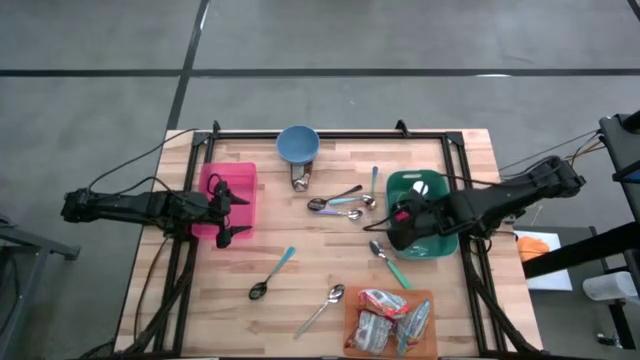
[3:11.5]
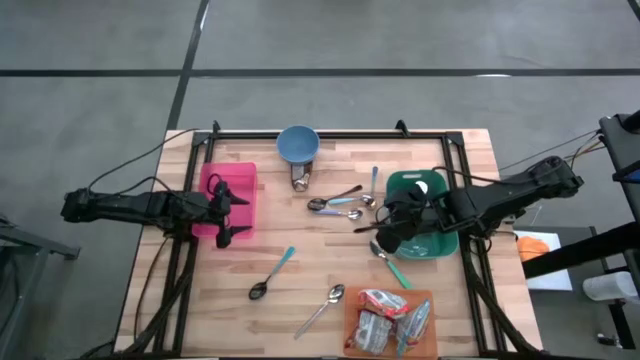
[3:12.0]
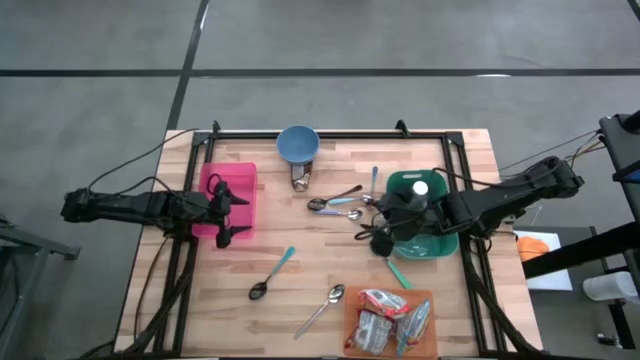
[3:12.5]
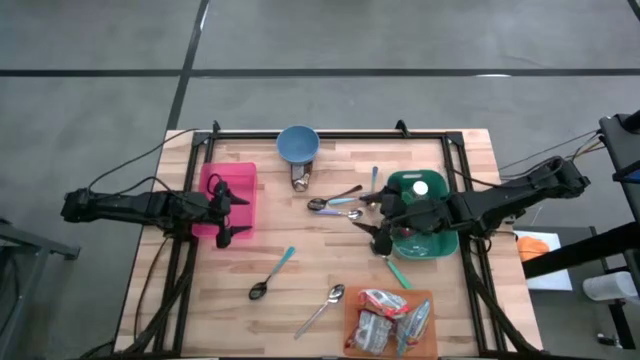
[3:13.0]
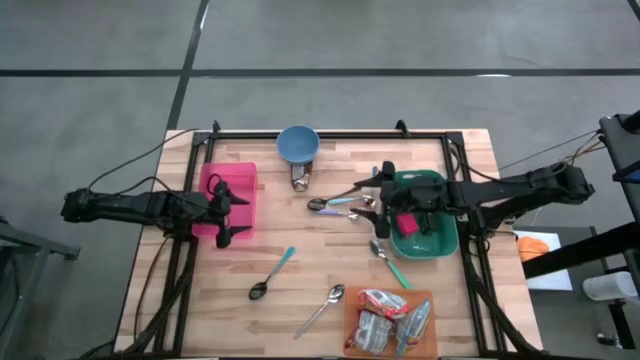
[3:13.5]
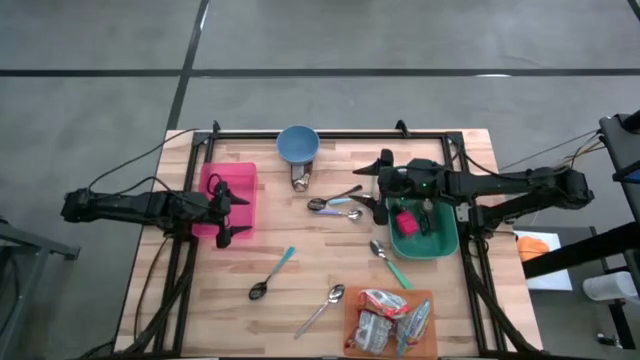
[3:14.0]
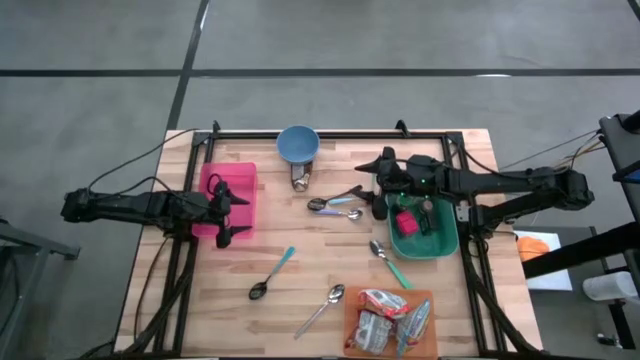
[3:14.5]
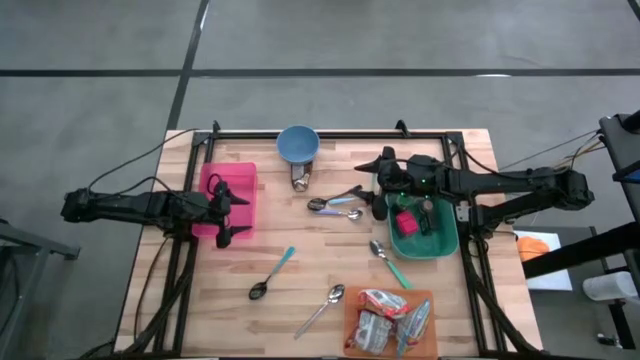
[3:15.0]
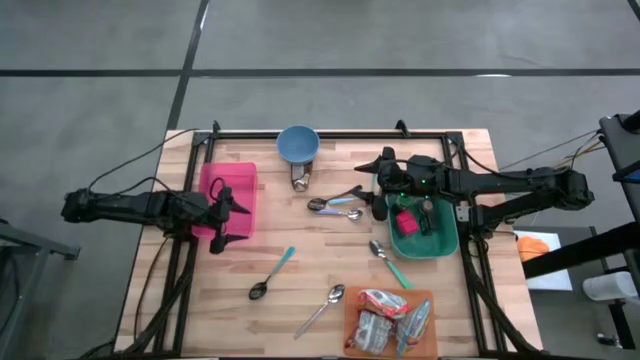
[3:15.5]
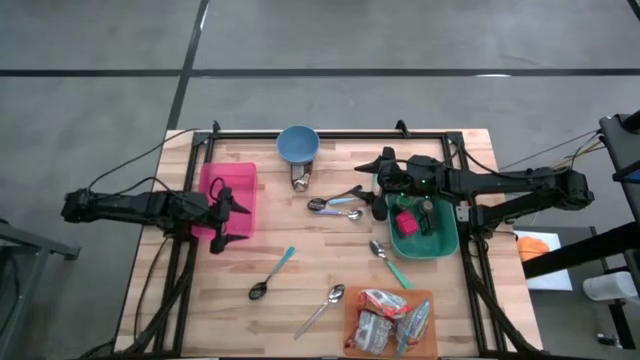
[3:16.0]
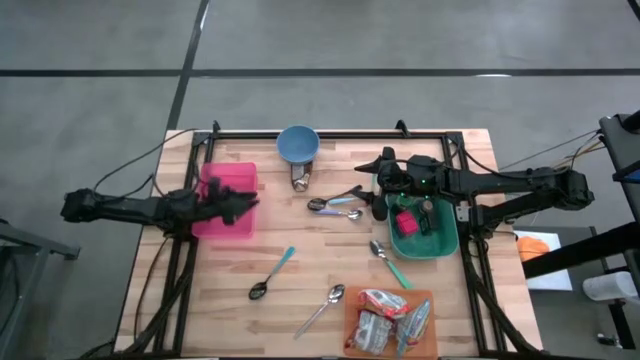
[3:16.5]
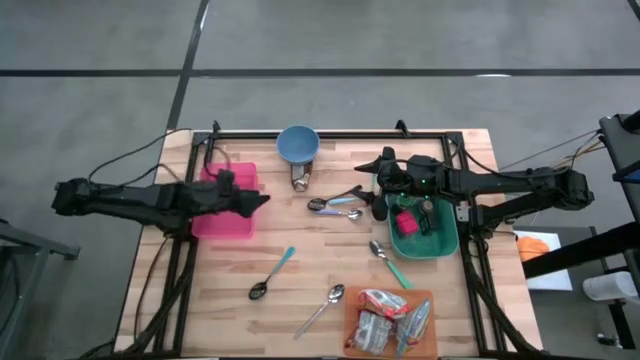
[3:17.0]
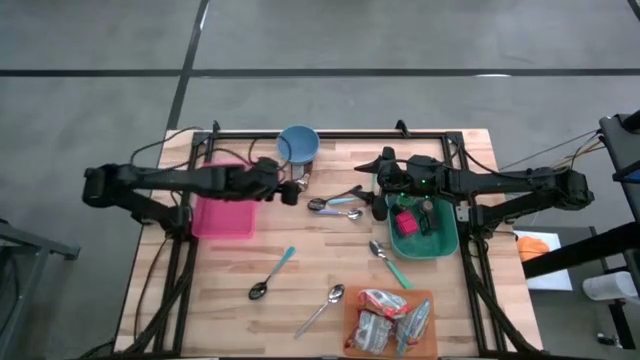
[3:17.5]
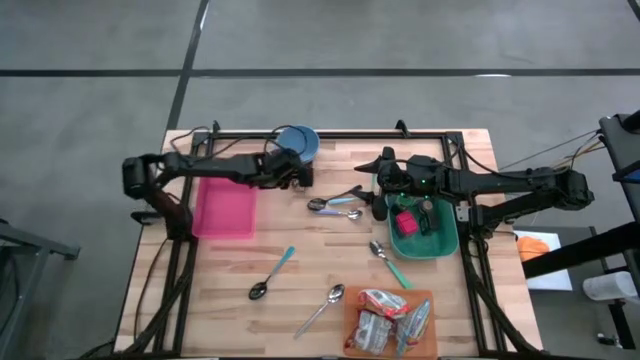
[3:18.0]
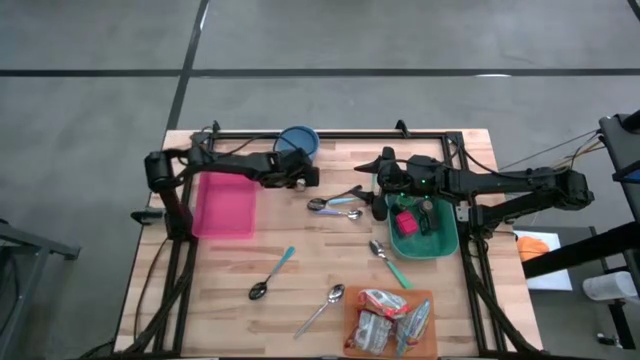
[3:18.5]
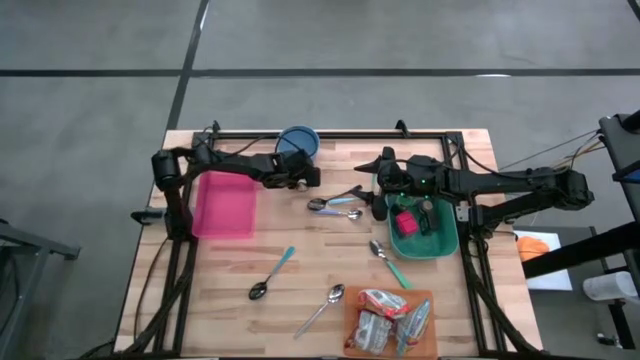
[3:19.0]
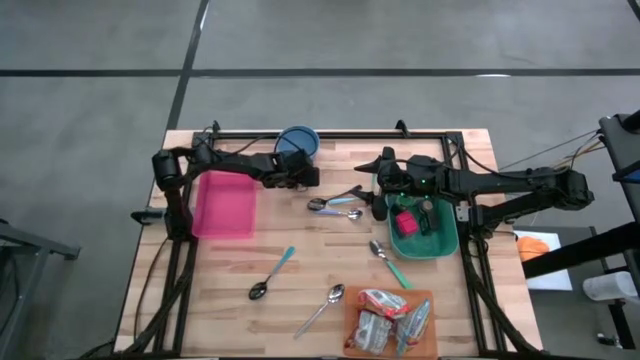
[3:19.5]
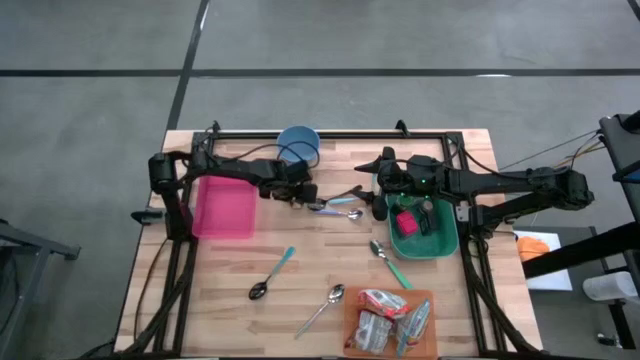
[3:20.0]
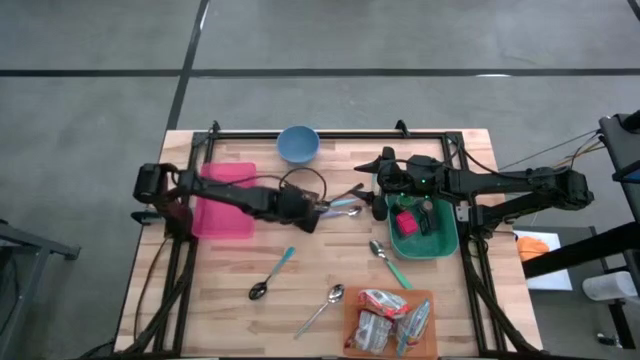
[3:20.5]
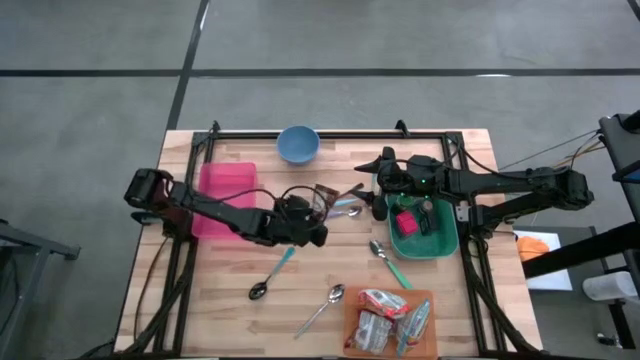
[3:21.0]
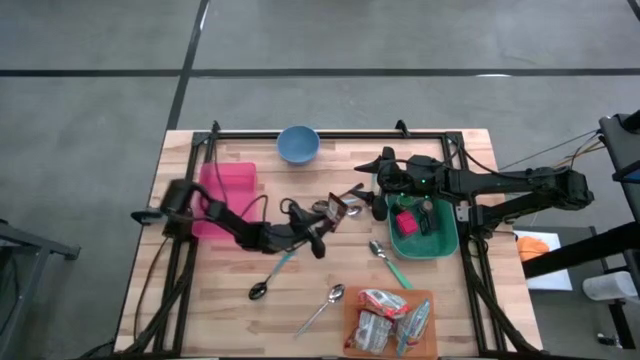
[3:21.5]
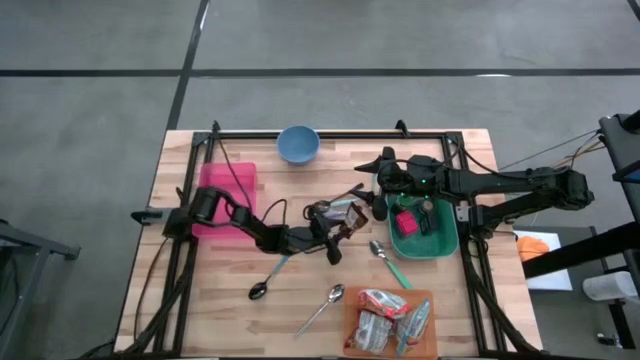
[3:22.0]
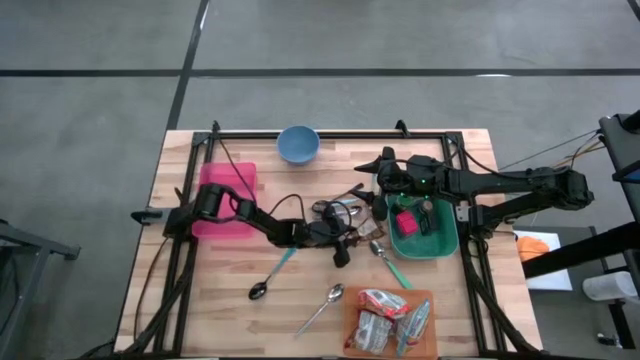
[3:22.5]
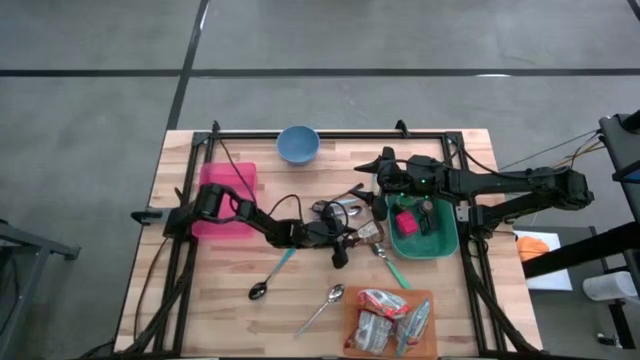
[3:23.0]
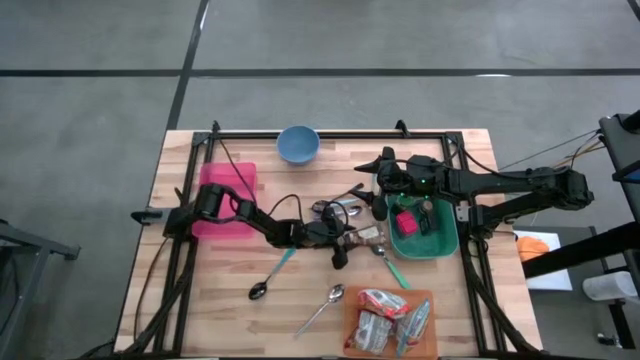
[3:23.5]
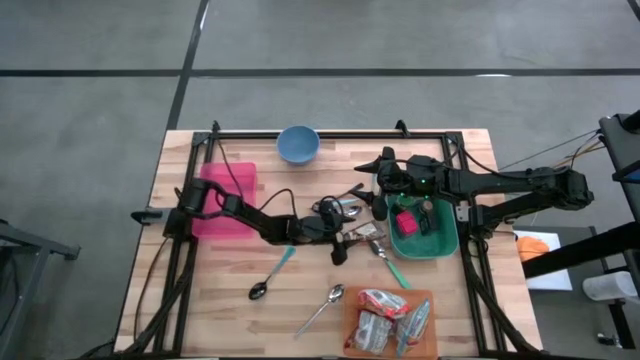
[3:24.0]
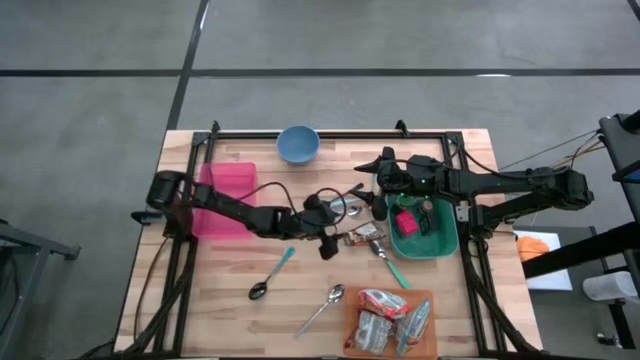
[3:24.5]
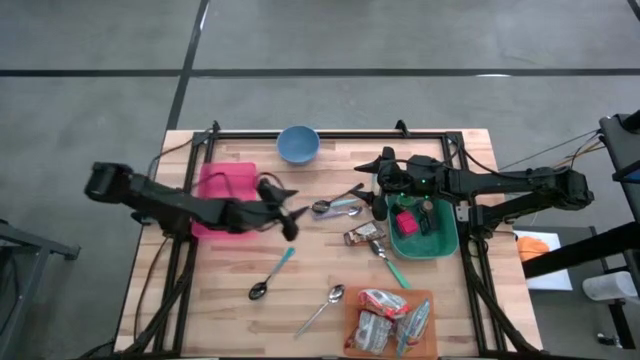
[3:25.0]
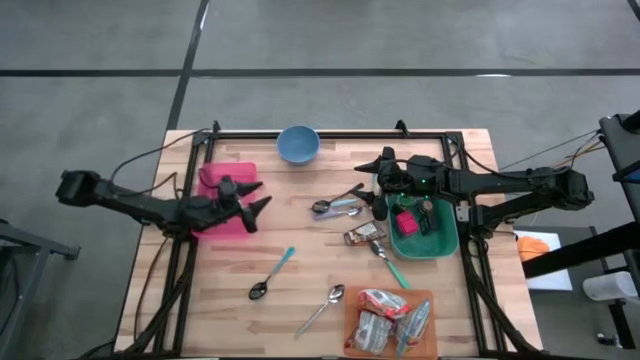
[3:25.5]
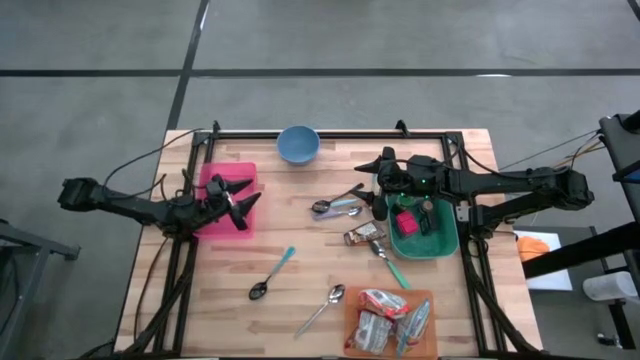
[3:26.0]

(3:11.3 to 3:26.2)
Put the orange seasoning pack into the green bin

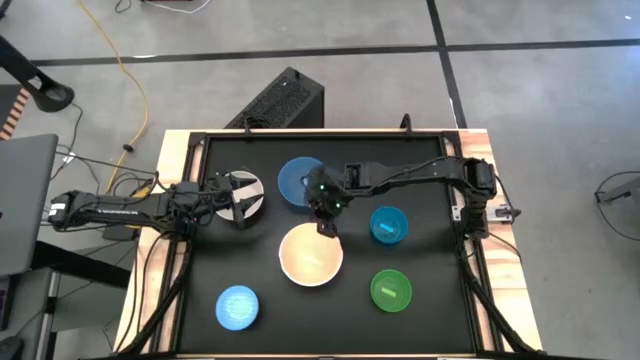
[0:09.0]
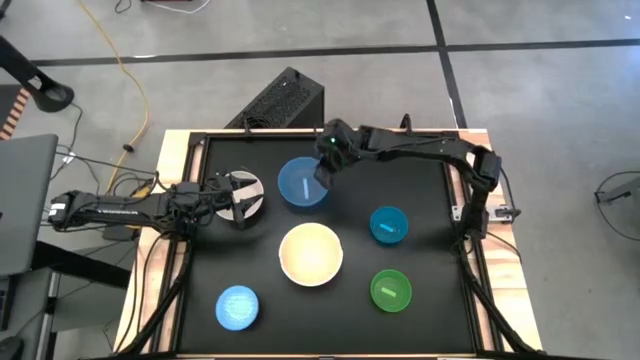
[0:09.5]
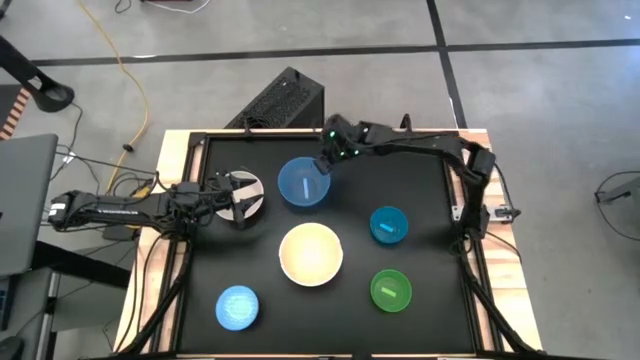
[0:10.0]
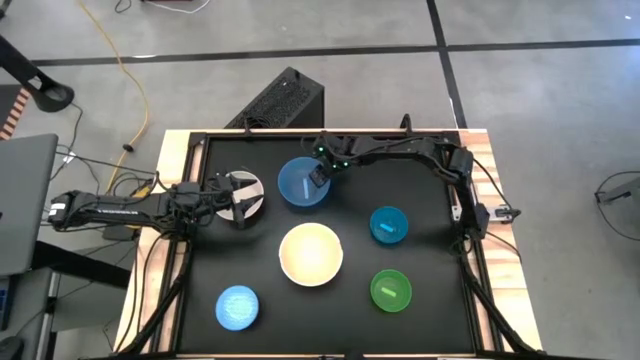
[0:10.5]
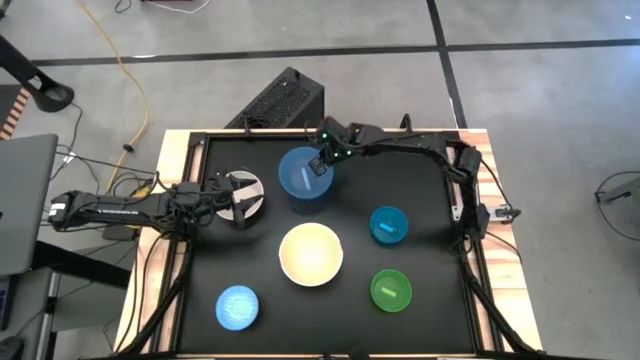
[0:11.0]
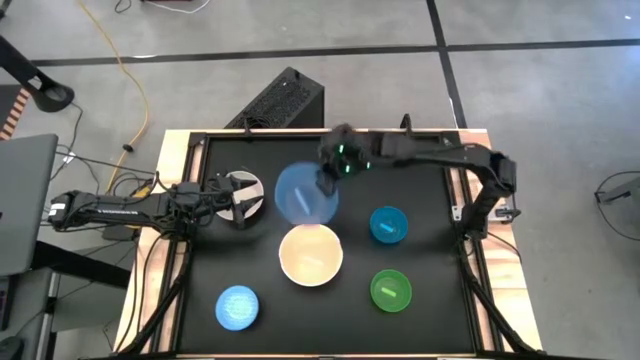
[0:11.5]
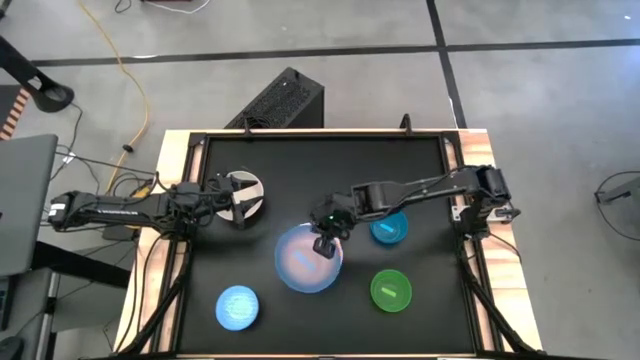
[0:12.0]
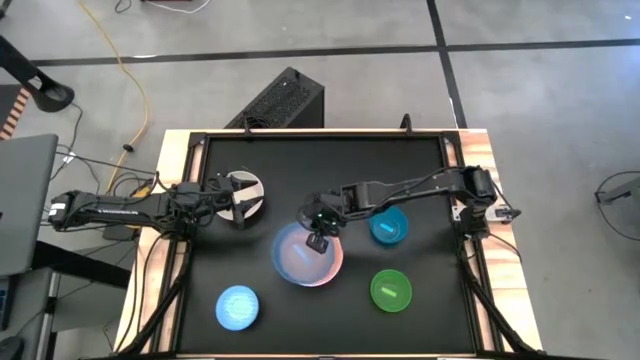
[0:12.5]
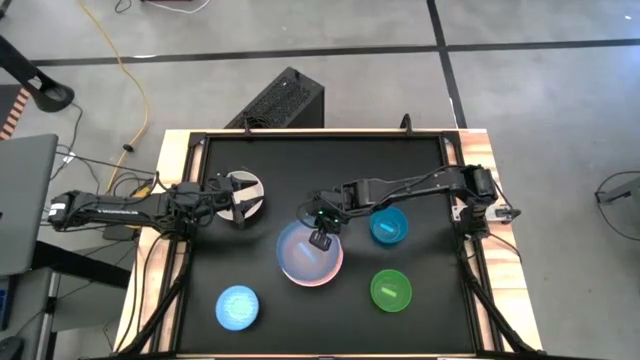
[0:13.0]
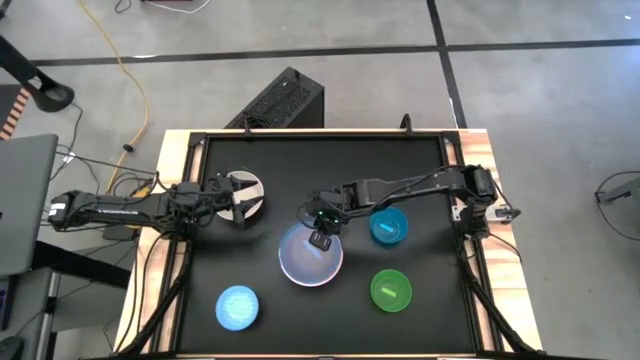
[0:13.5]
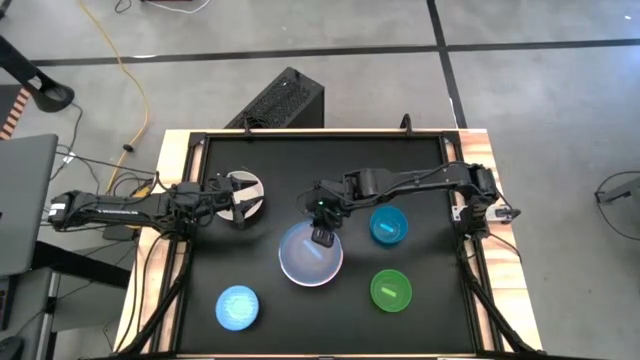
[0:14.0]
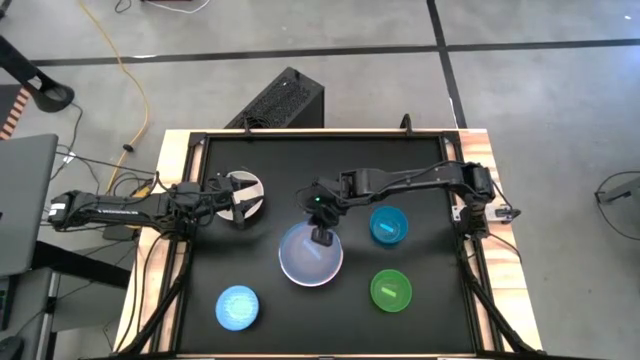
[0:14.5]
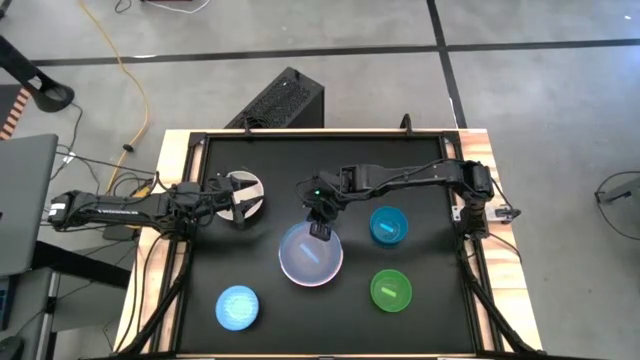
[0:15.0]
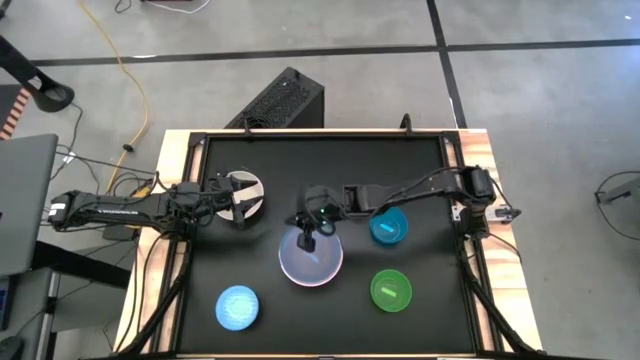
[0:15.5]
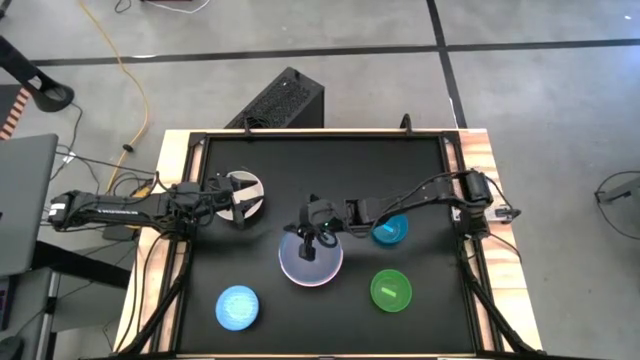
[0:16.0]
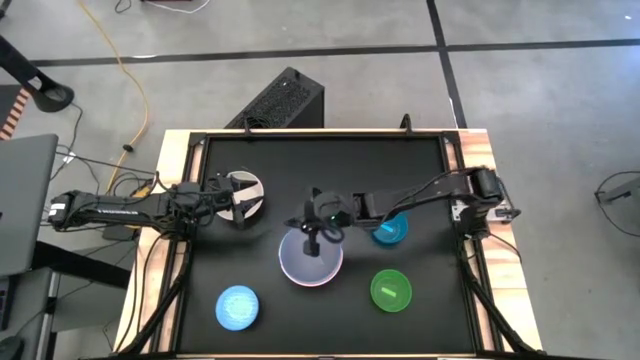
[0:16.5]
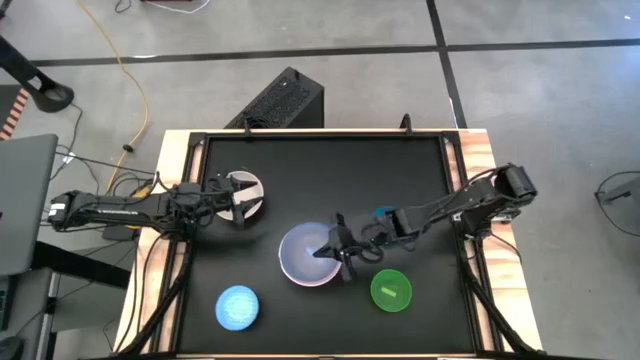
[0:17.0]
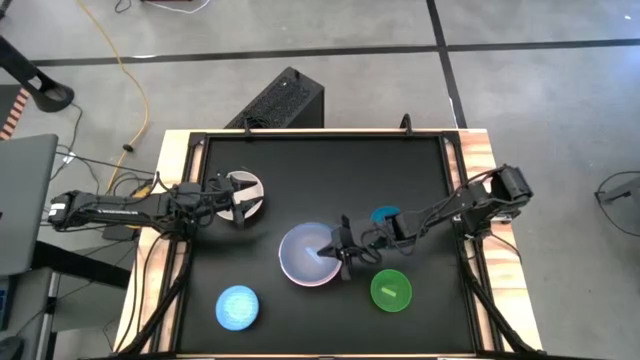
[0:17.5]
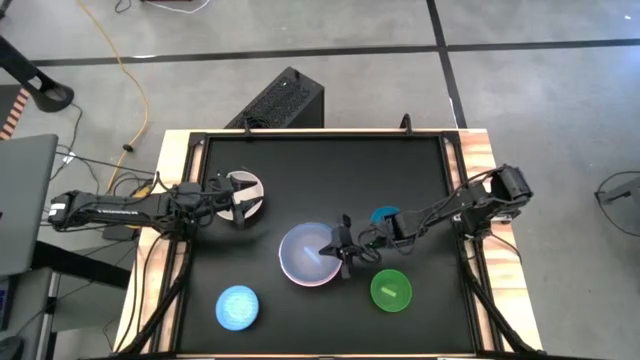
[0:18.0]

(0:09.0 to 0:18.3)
Stack the top transparent blue bowl on top of the transparent light orange bowl
